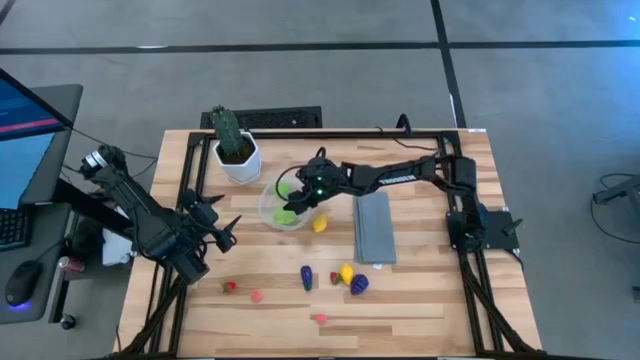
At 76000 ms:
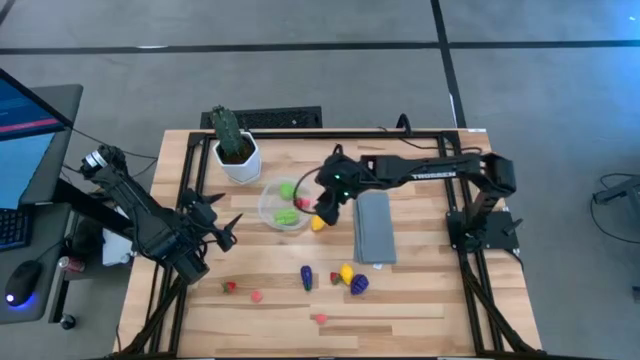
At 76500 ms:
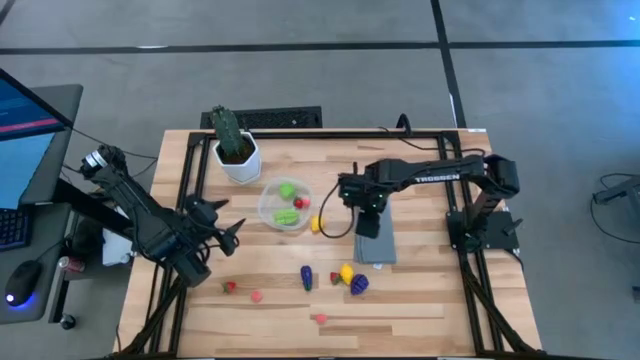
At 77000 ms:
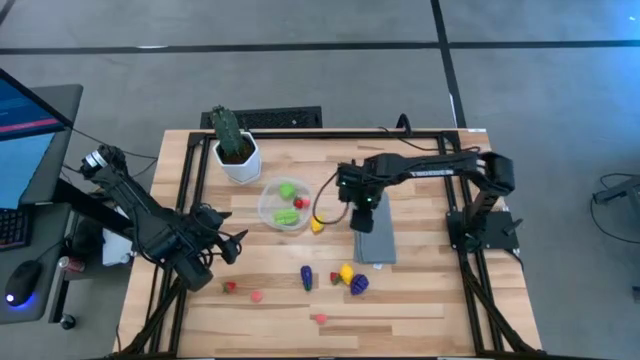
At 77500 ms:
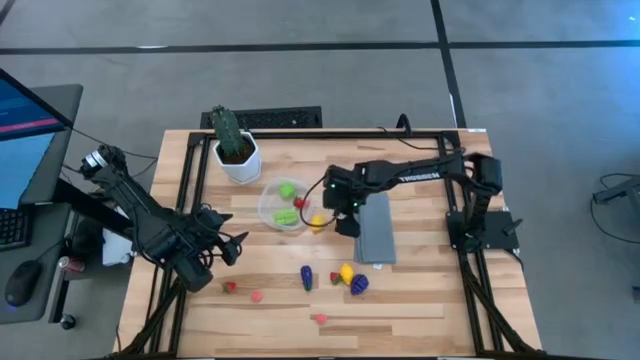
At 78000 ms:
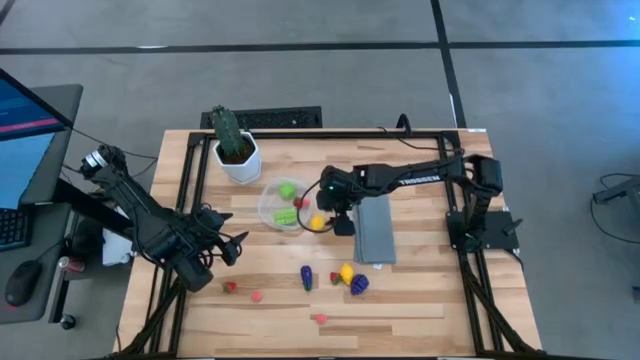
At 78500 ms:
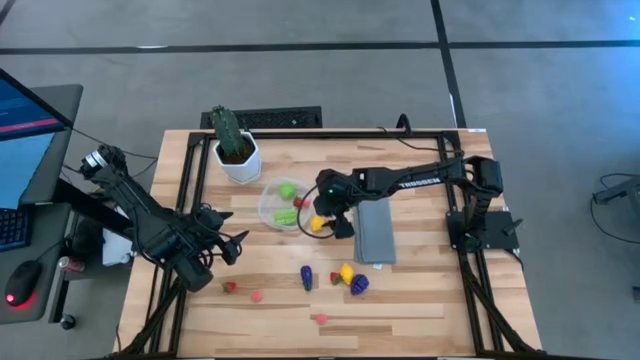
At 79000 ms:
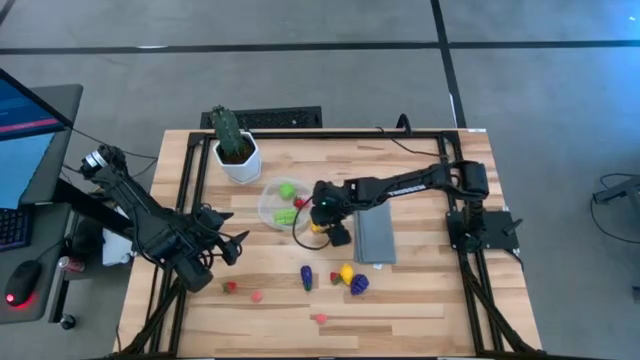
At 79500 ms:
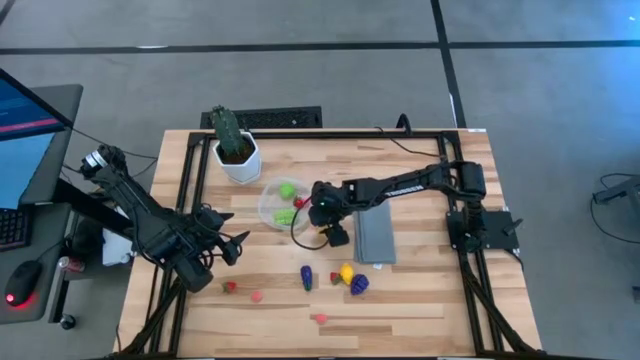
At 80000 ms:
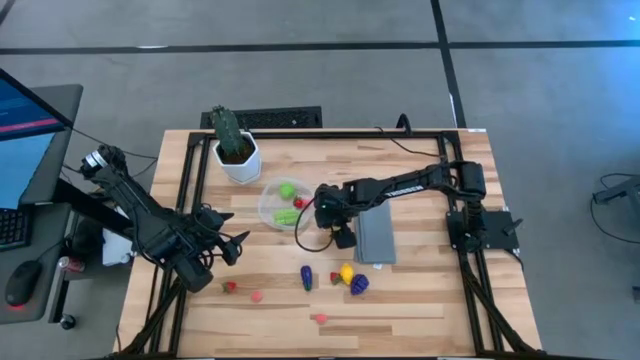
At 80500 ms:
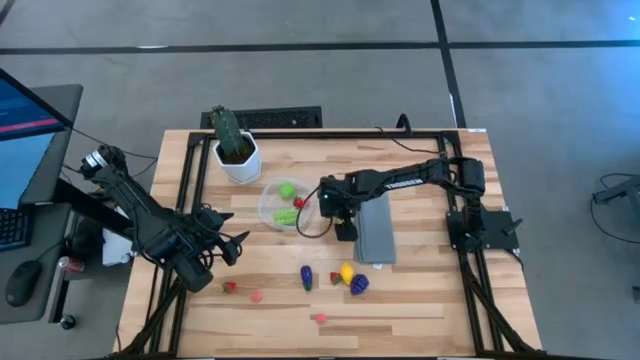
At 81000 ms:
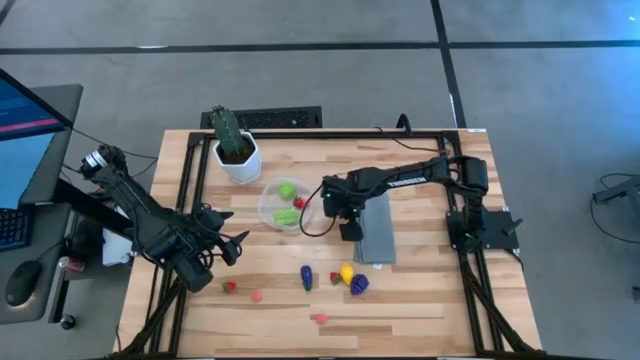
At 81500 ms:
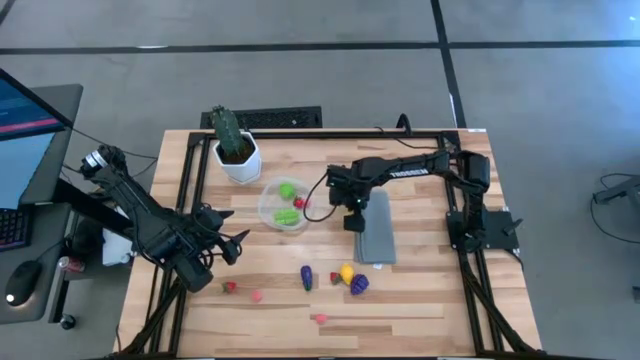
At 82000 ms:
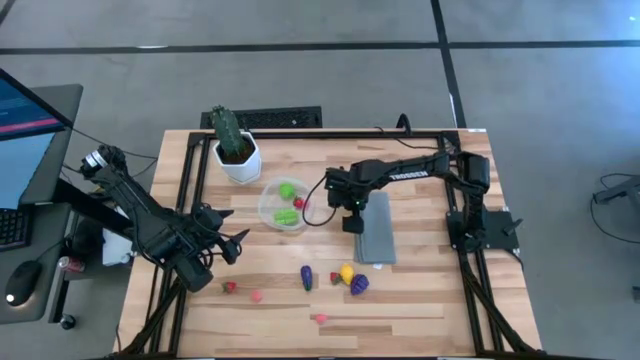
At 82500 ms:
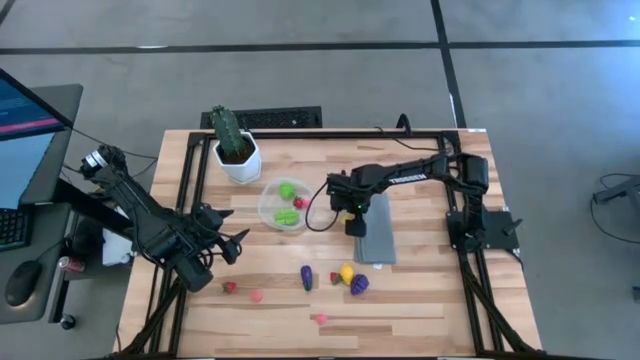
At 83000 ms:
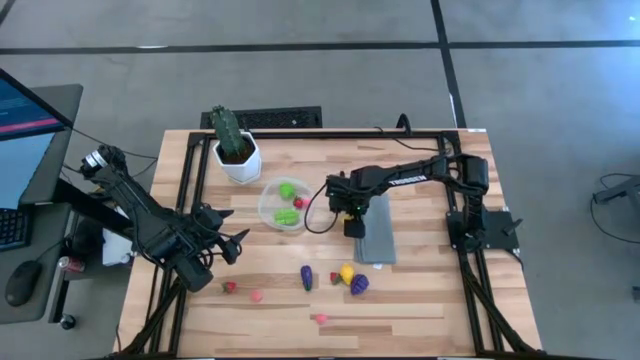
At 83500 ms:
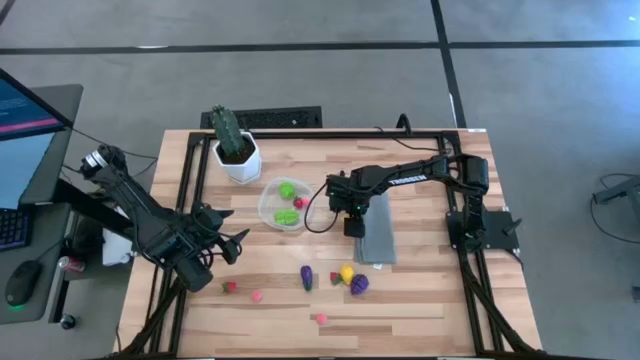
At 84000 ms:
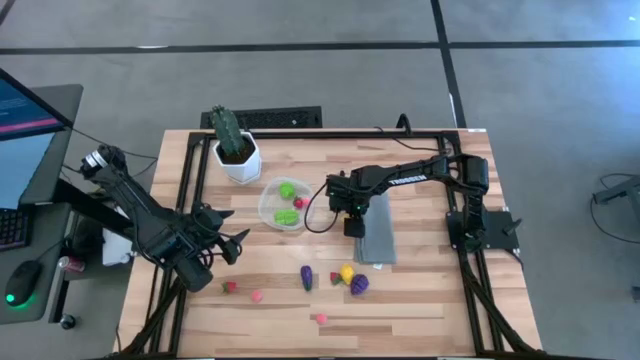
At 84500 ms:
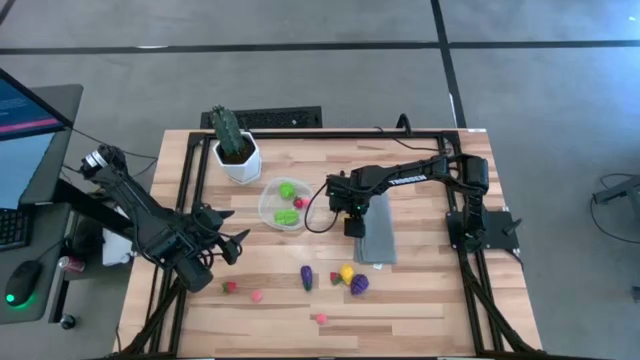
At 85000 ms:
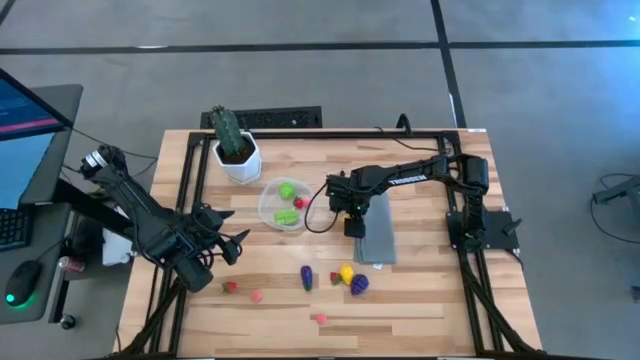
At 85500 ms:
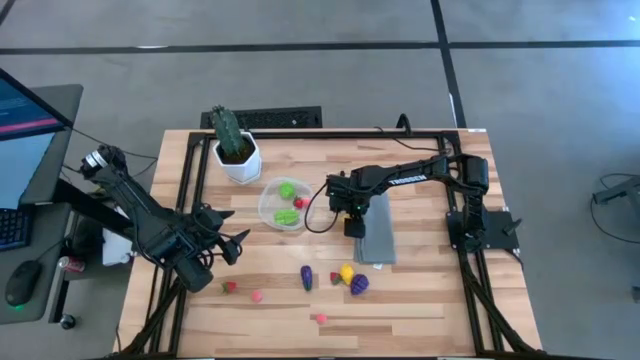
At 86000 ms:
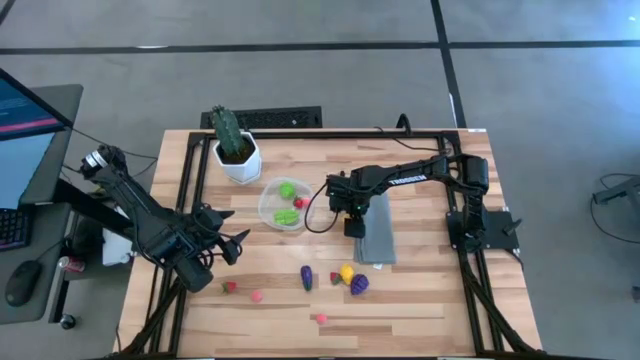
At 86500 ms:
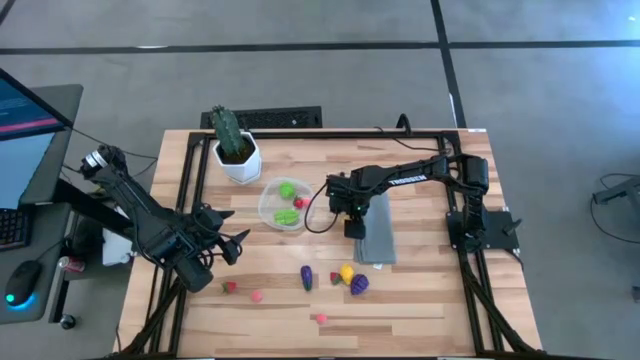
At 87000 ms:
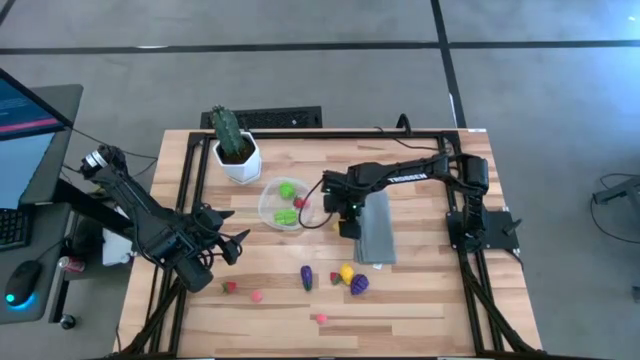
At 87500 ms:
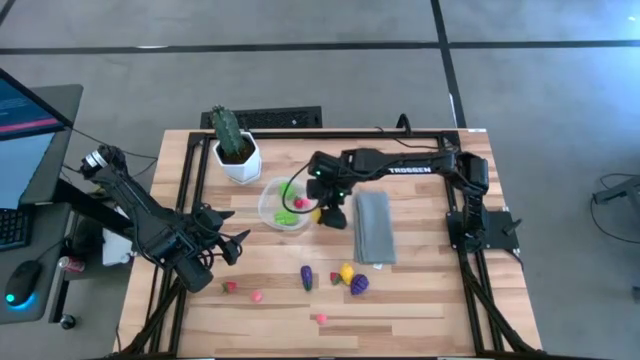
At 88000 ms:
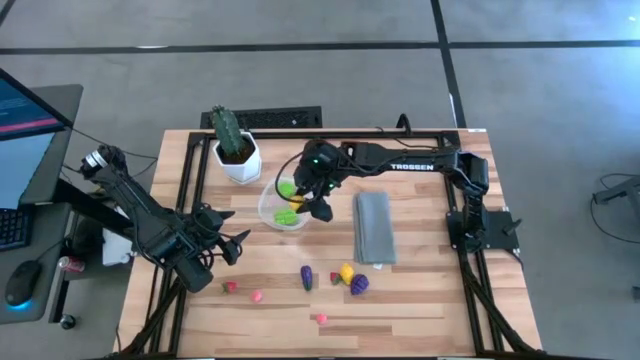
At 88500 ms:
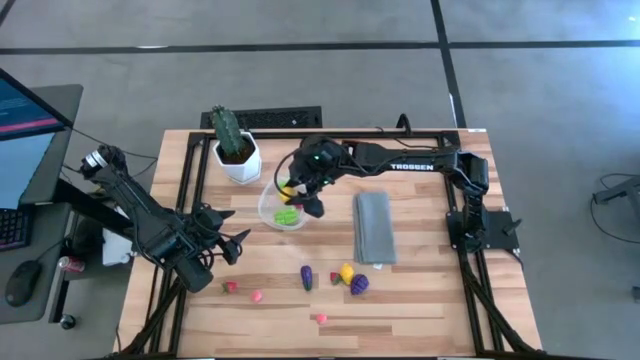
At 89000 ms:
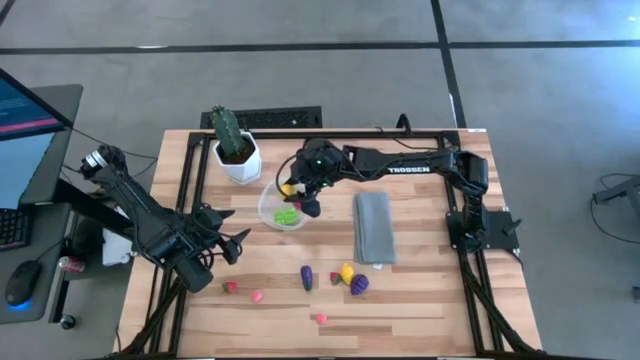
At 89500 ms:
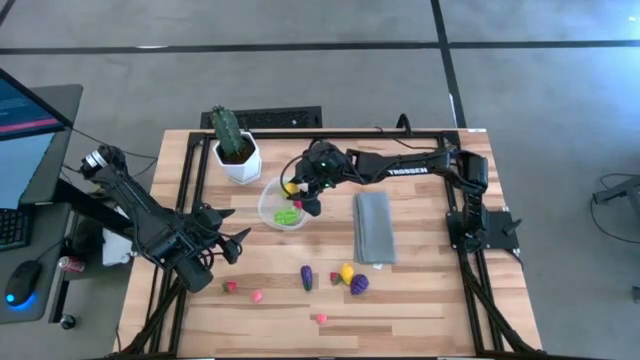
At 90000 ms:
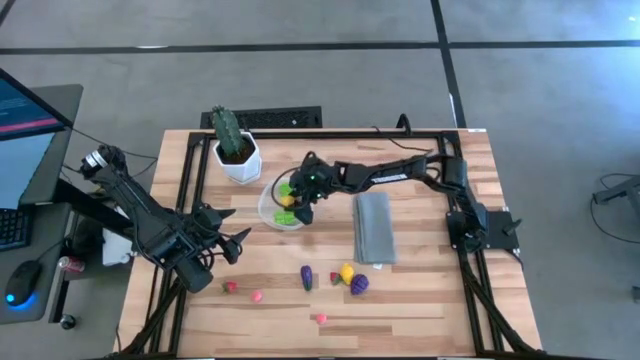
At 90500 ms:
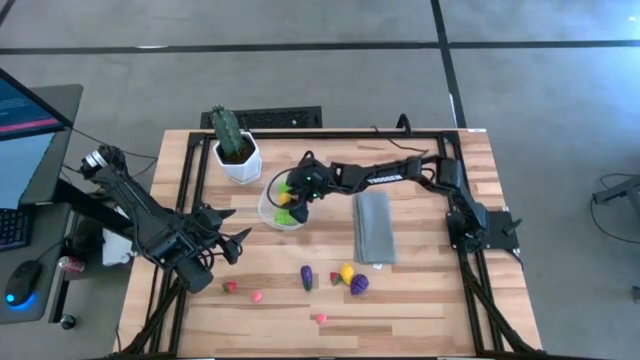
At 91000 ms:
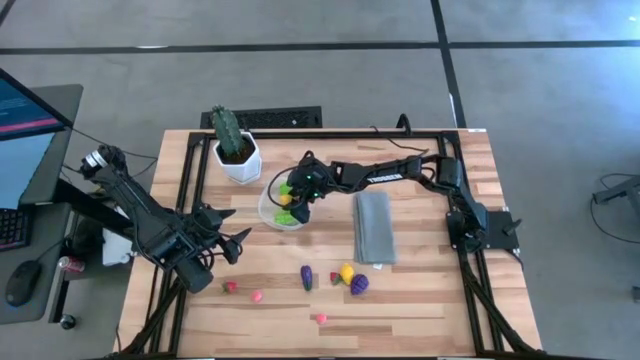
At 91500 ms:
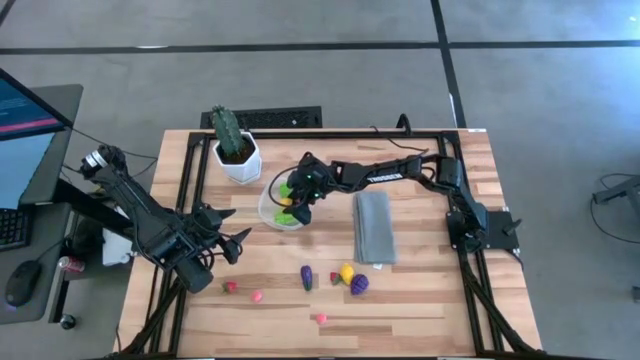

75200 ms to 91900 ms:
Task: Pick and placing Produce into tupperware
Put the top yellow lemon into the transparent container

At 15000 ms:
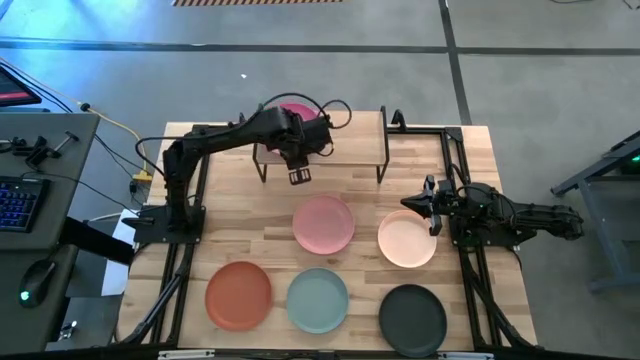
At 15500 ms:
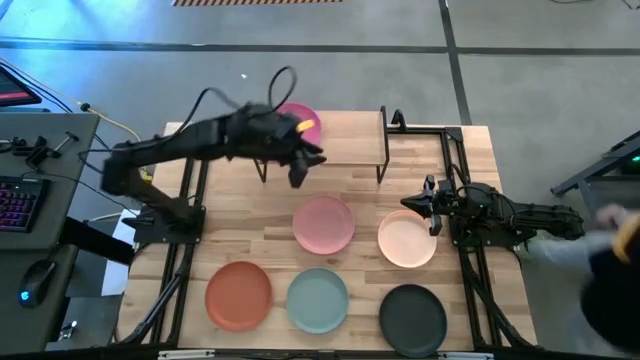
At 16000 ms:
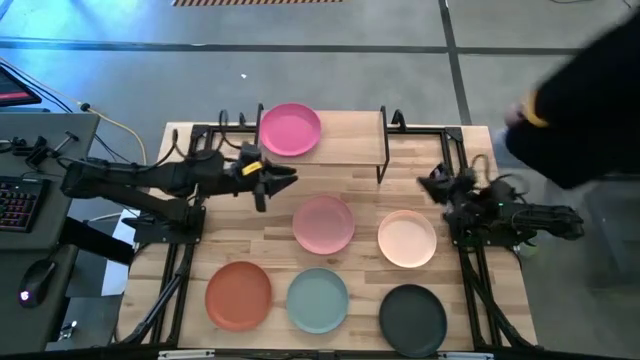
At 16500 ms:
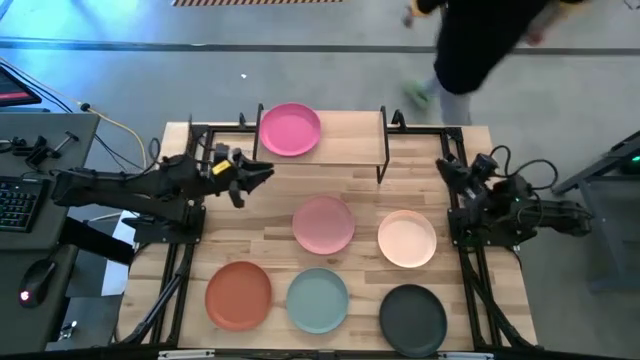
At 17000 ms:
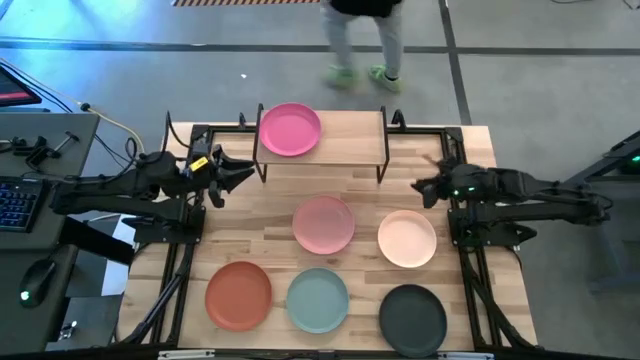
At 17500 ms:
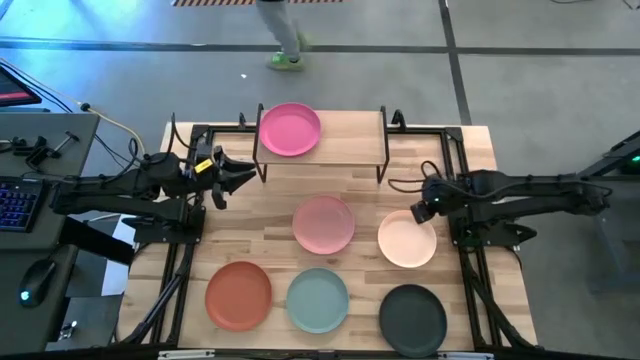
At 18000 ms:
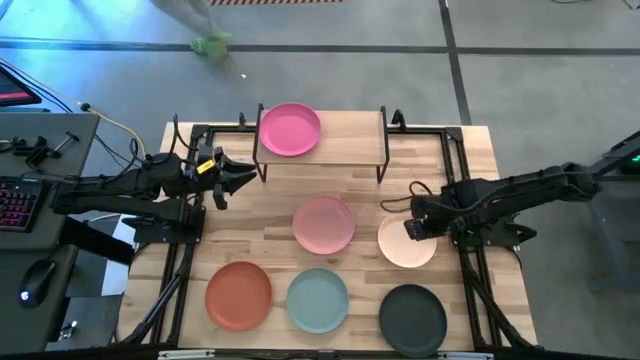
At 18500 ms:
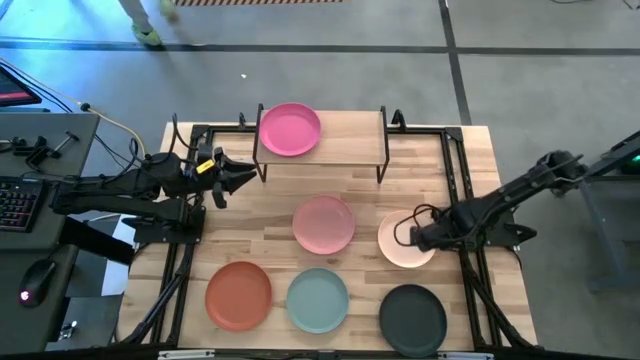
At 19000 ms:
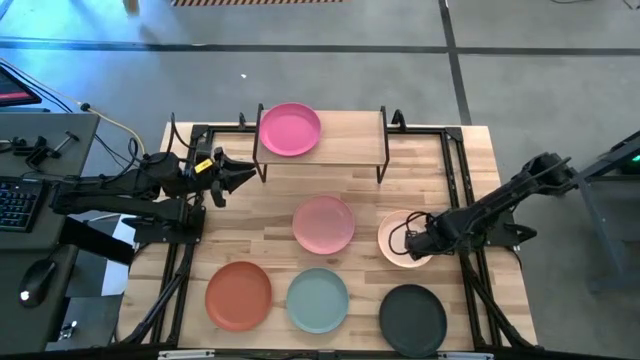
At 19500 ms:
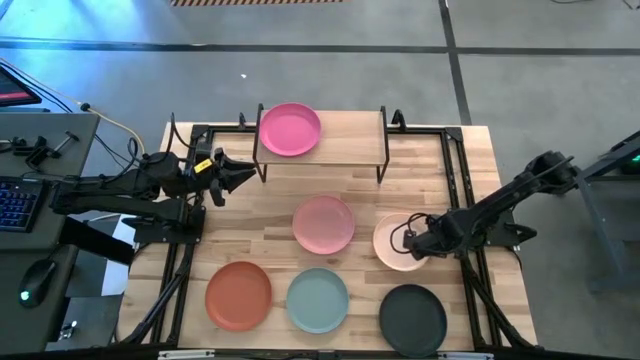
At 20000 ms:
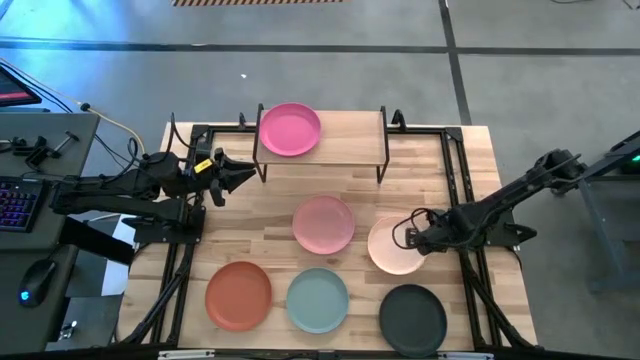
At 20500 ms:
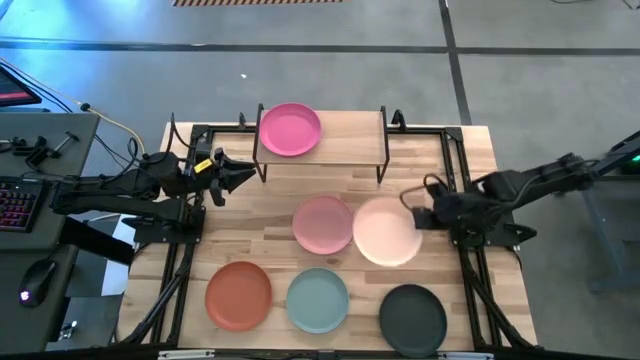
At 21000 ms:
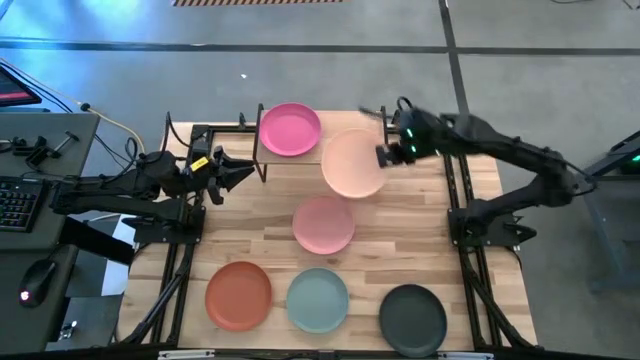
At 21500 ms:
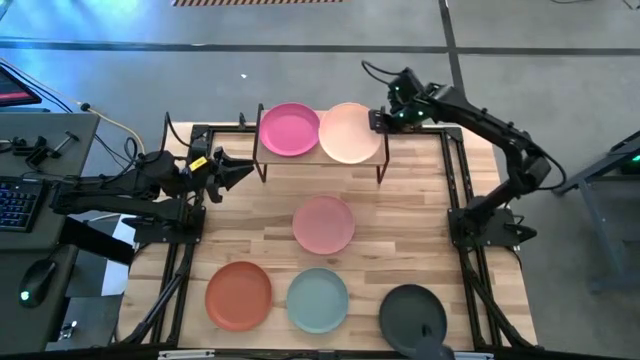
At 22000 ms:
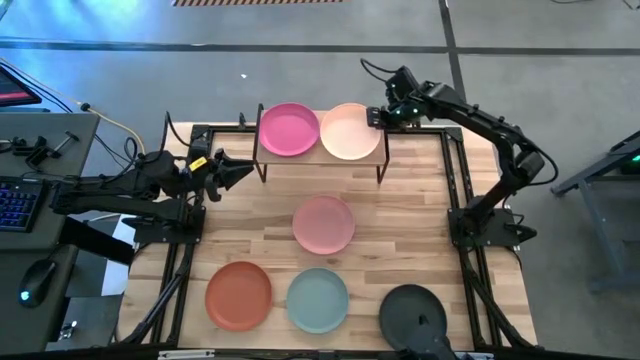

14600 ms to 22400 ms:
Task: Place and stack plates onto a shelf
Put the white plate on the shelf
